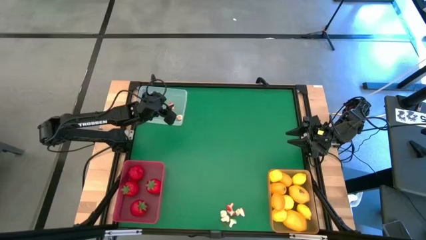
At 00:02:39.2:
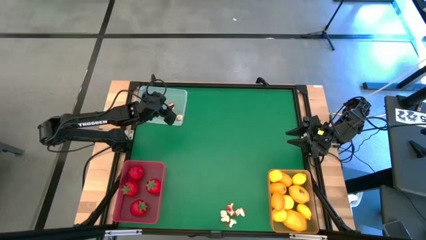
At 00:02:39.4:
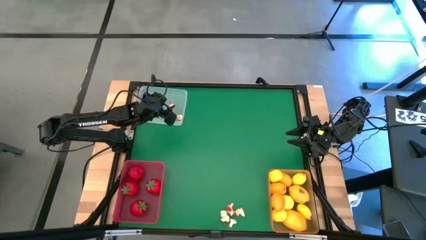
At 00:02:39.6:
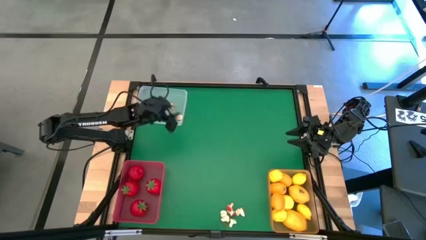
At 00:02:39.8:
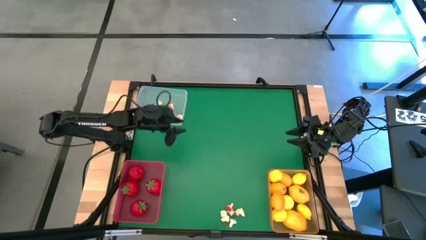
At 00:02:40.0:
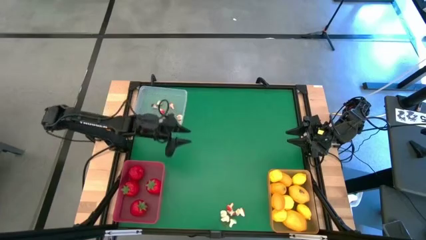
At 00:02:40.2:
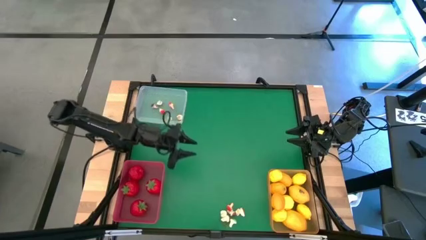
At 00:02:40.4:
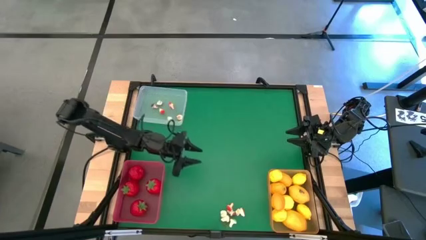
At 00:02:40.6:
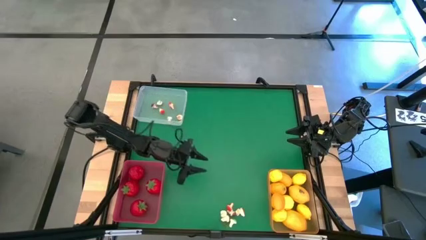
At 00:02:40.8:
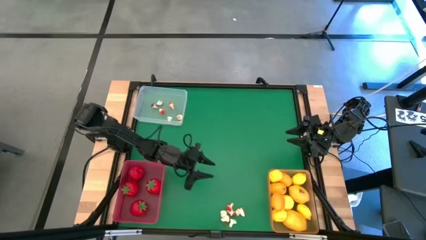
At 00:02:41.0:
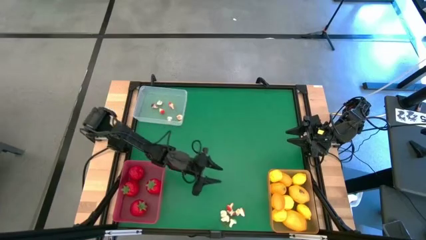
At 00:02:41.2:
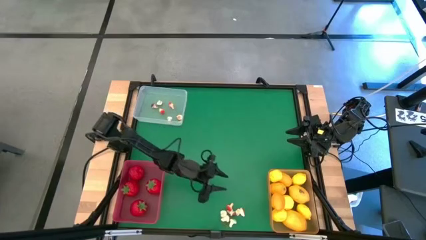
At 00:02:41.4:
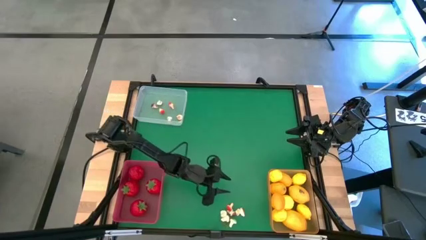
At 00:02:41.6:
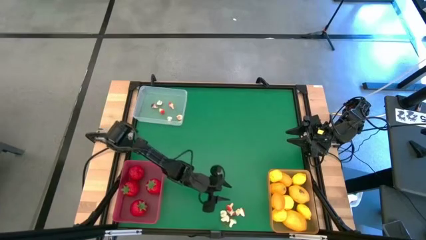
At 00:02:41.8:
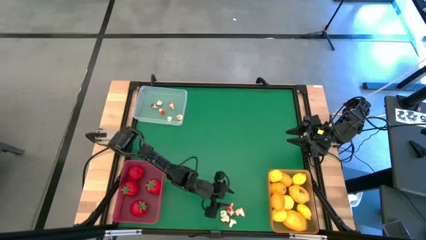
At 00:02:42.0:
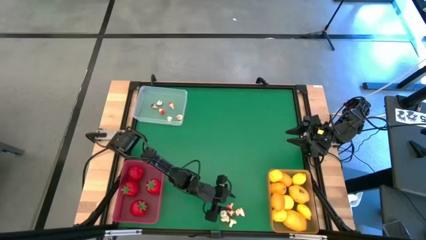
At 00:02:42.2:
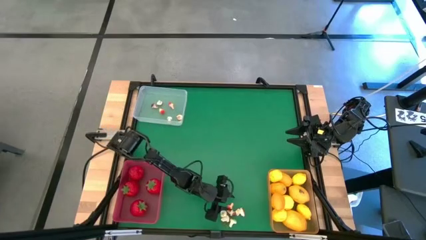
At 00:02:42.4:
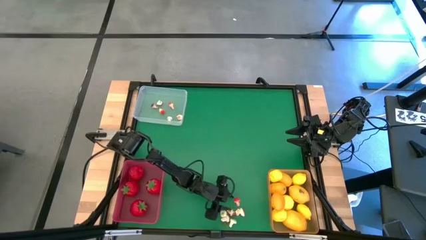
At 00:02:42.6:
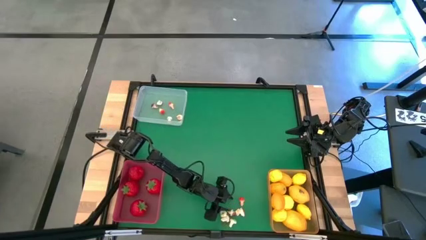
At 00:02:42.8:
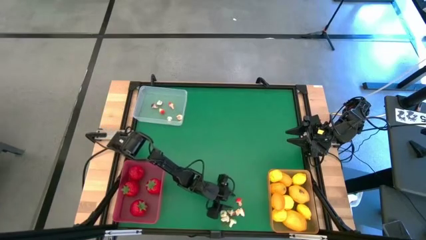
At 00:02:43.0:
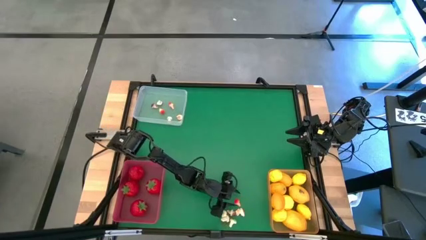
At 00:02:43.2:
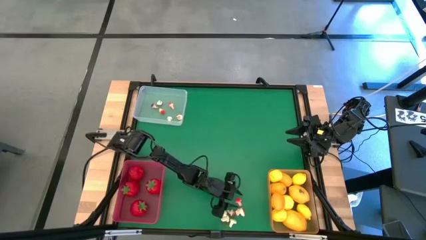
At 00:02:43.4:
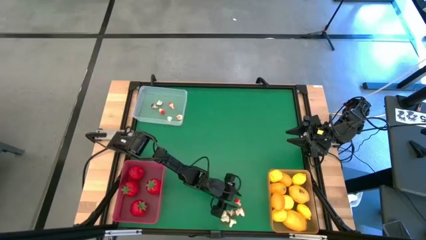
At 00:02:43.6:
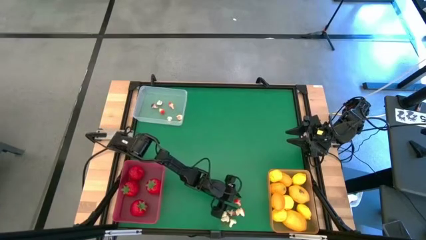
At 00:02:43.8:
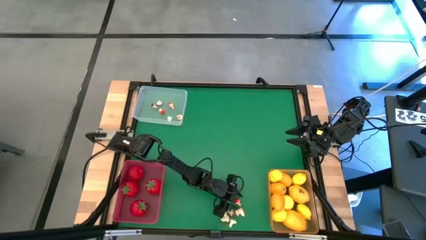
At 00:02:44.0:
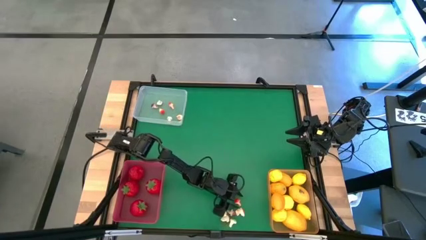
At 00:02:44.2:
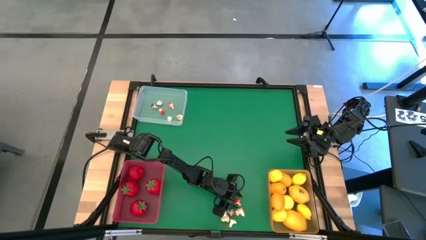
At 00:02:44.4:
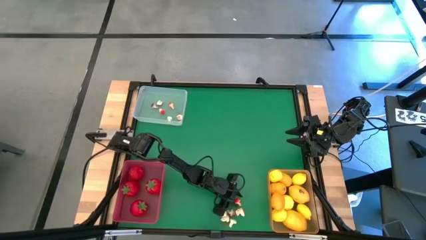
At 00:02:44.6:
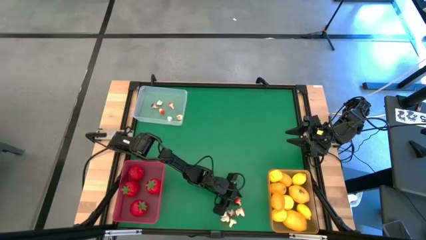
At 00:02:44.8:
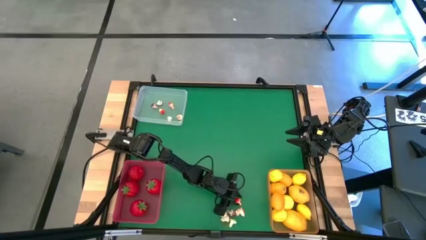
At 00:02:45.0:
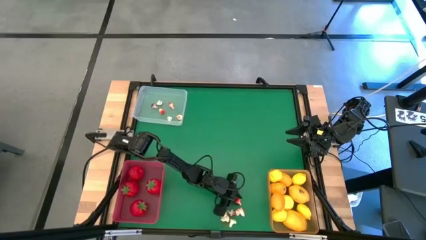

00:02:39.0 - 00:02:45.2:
Task: Sort produce into baskets
Put the red mushroom into the white bin

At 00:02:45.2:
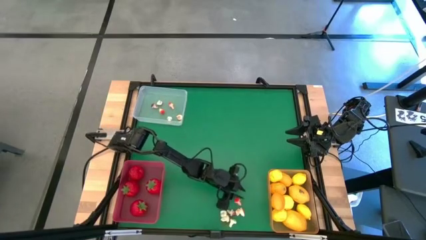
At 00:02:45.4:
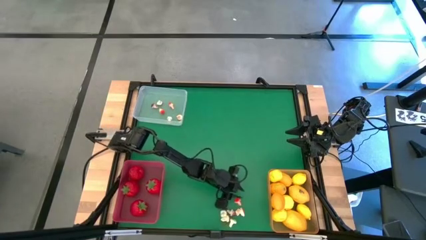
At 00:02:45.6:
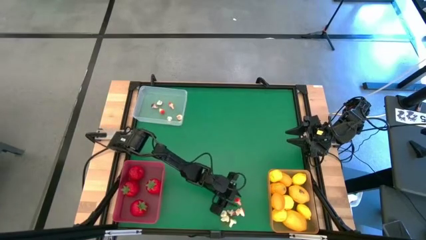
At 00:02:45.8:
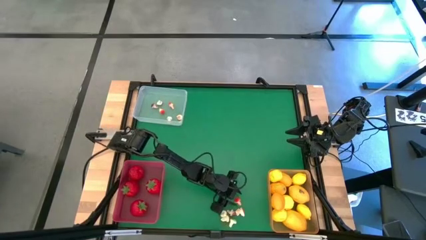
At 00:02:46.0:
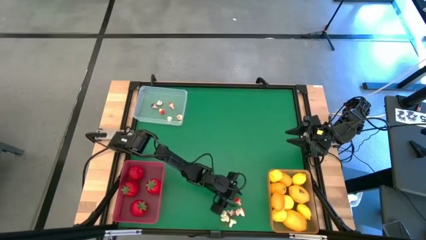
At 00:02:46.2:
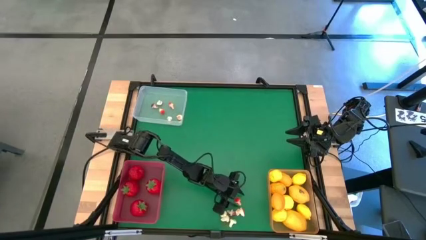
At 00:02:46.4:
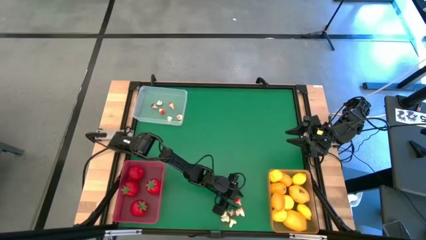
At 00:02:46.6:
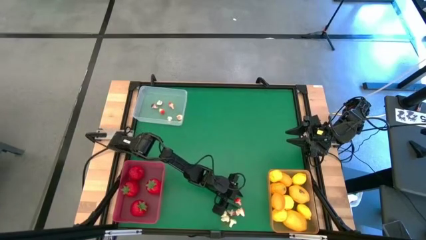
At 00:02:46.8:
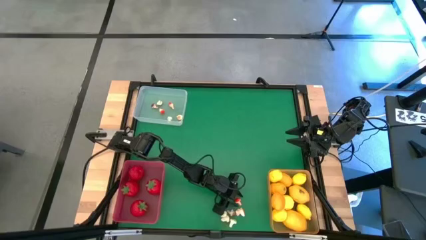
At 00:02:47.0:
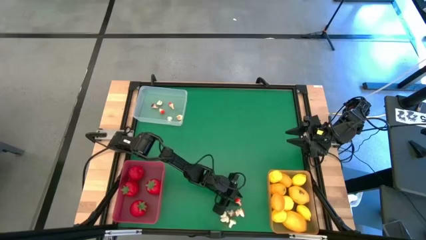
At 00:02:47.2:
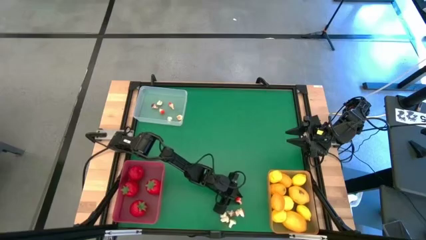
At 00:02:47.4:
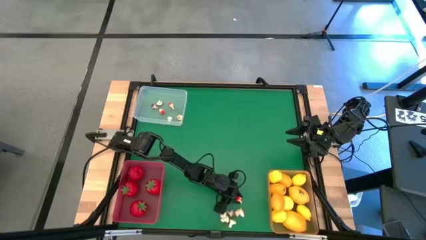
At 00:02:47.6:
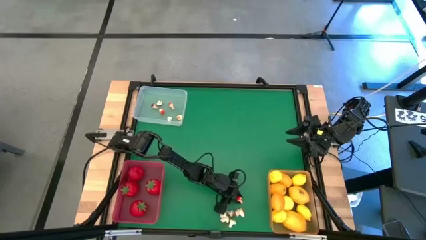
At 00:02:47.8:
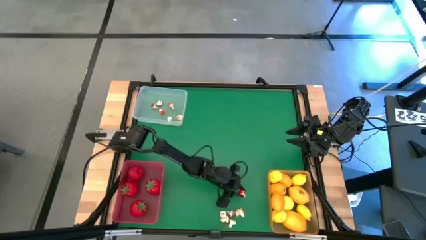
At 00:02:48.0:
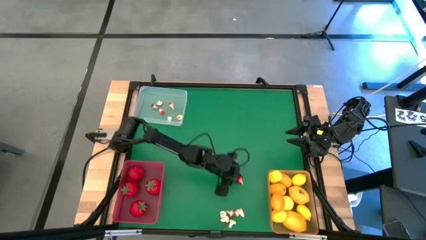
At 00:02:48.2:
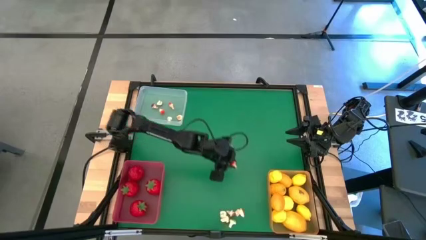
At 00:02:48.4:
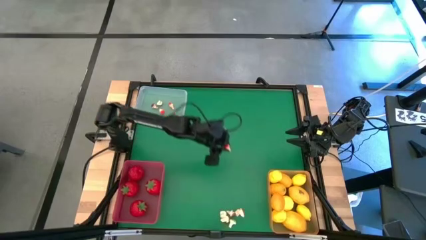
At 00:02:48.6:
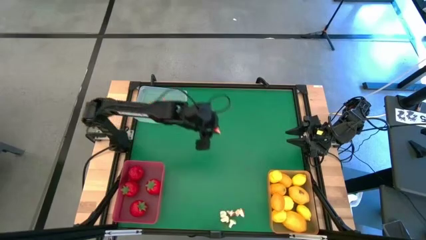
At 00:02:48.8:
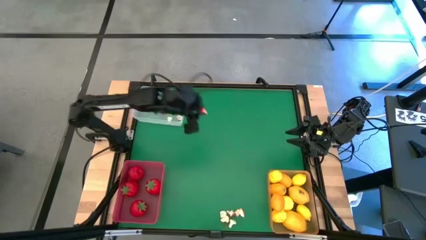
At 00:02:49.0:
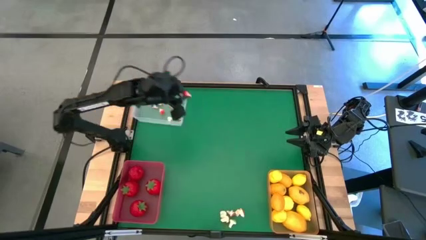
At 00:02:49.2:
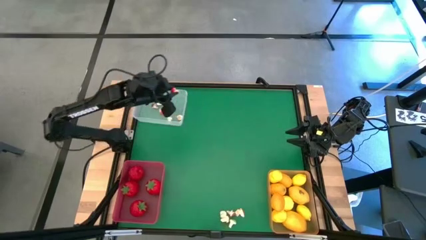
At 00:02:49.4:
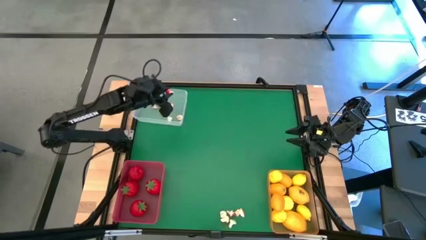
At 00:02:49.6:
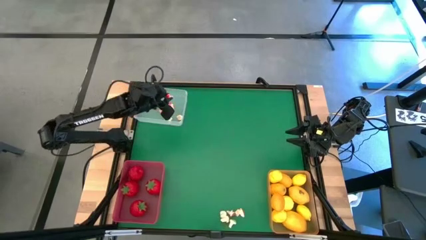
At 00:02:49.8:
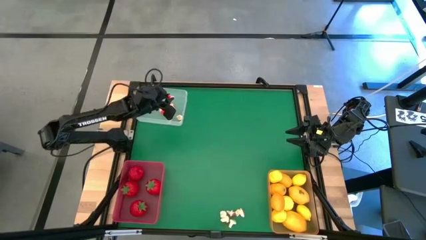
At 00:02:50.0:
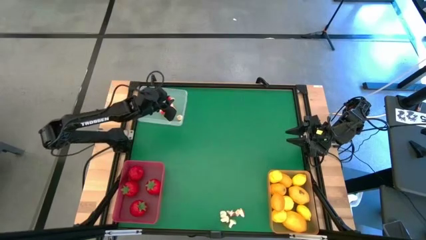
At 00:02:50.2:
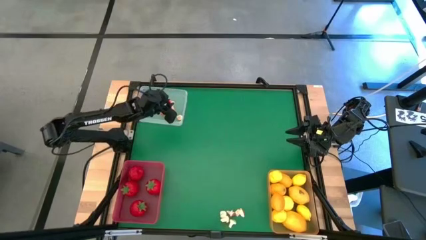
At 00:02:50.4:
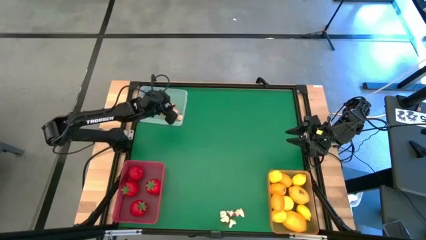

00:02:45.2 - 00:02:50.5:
Put the red mushroom into the white bin

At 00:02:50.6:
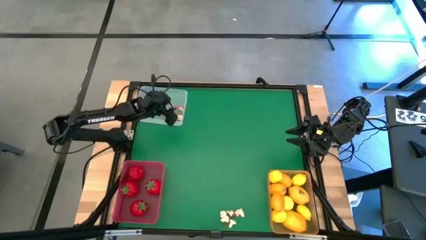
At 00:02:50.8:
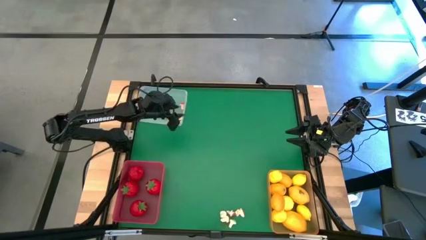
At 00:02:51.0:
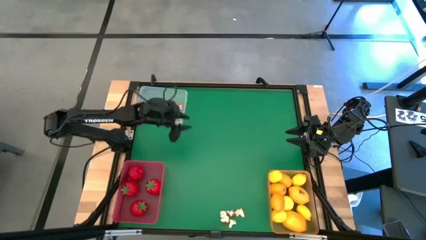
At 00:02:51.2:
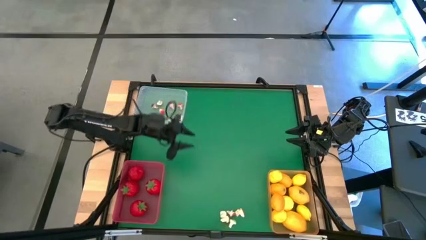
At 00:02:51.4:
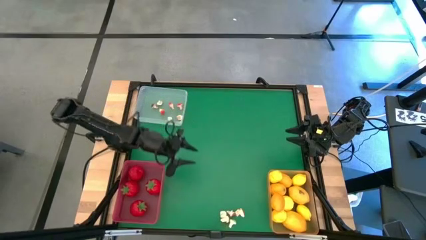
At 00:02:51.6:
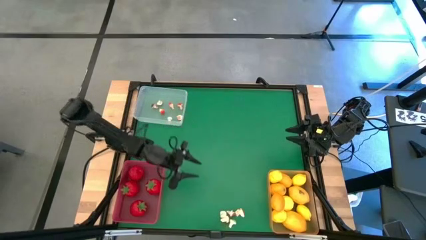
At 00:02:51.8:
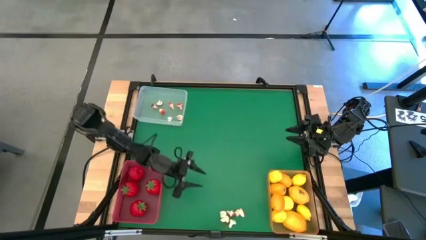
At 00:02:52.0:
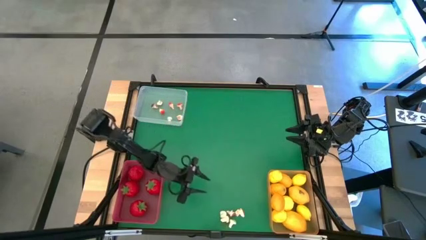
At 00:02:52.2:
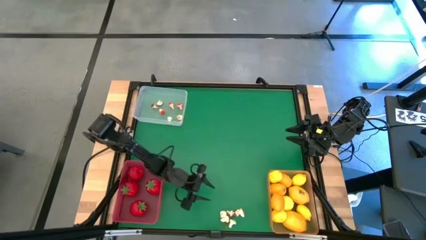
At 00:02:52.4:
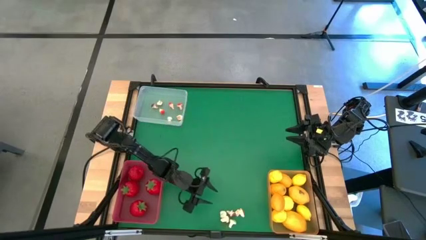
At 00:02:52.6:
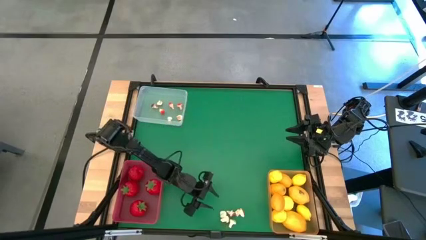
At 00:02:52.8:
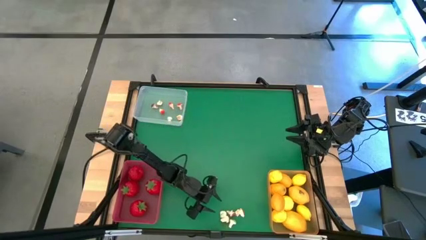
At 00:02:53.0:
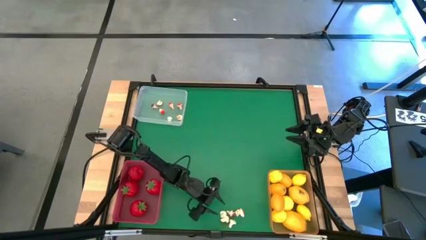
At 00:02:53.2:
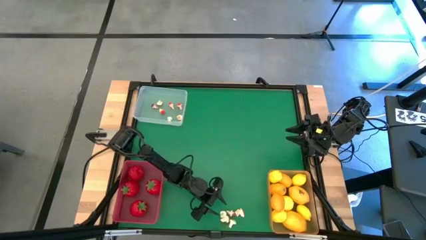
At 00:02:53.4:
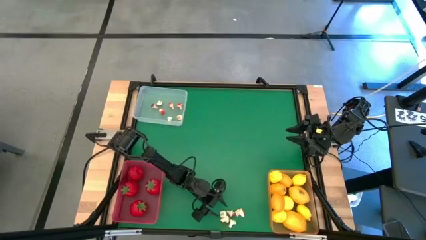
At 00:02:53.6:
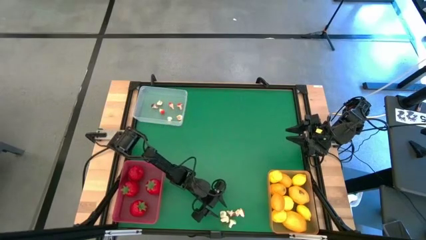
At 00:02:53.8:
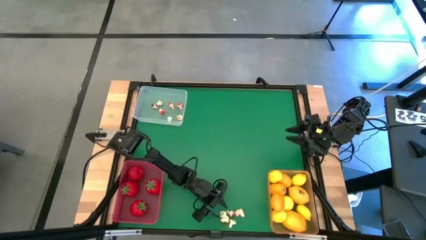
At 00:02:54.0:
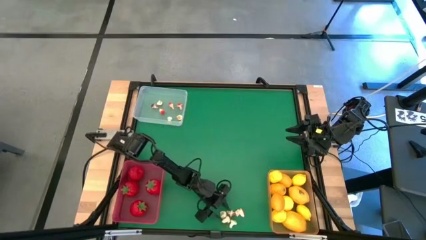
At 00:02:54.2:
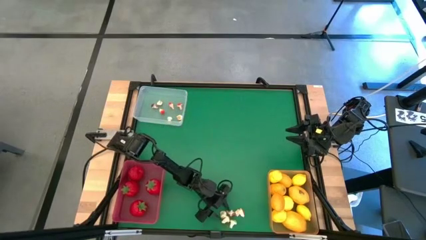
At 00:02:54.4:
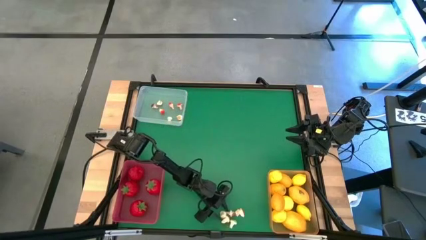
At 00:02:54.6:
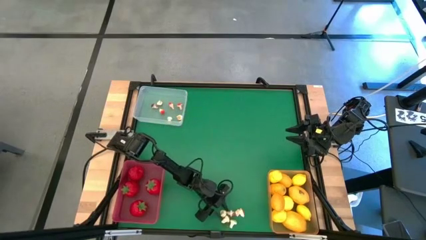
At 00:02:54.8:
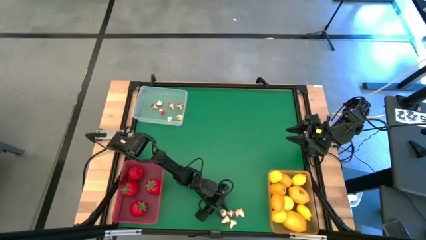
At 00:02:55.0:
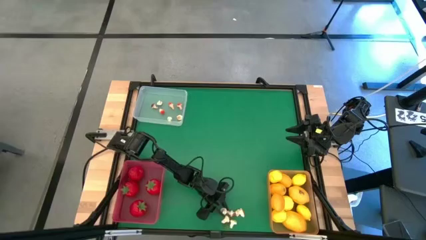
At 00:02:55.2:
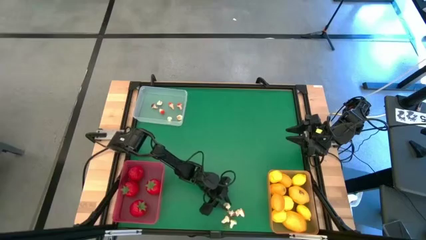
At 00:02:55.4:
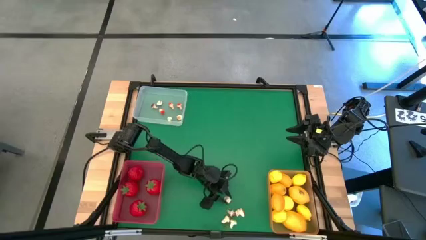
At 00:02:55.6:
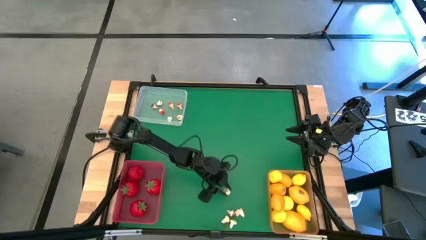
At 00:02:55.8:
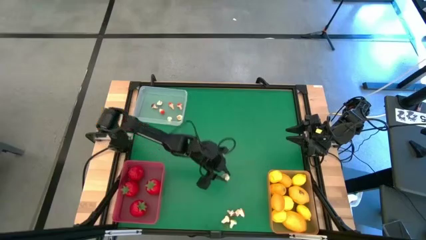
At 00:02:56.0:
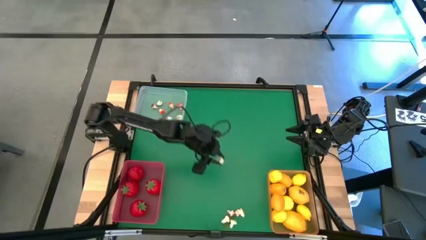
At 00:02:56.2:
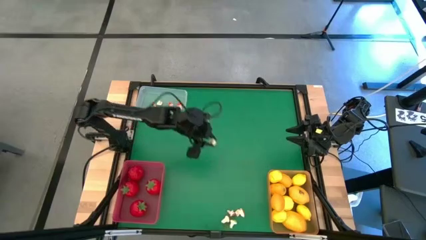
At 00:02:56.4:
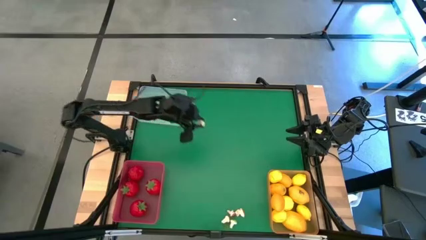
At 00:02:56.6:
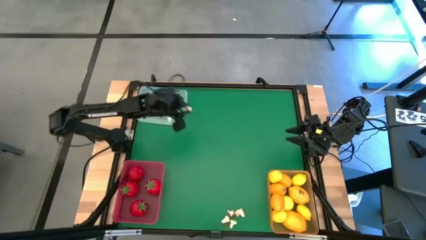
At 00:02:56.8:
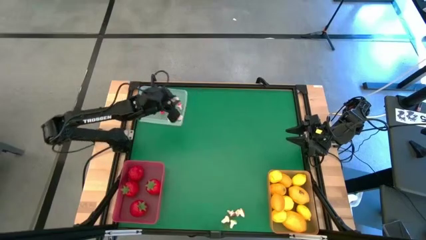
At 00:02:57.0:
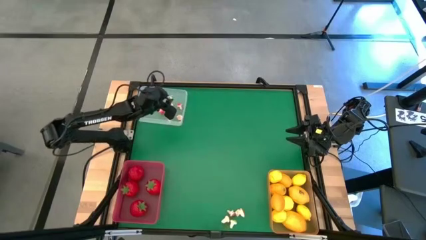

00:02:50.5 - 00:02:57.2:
Put the green mushroom into the white bin
